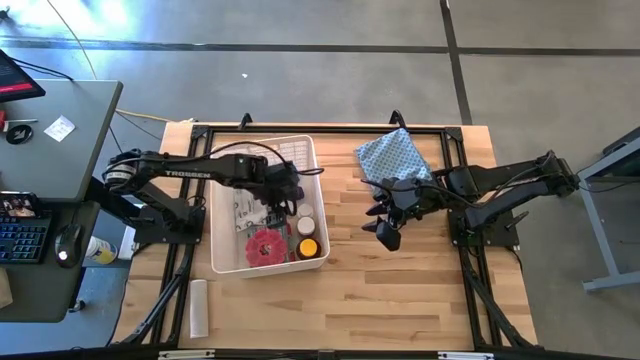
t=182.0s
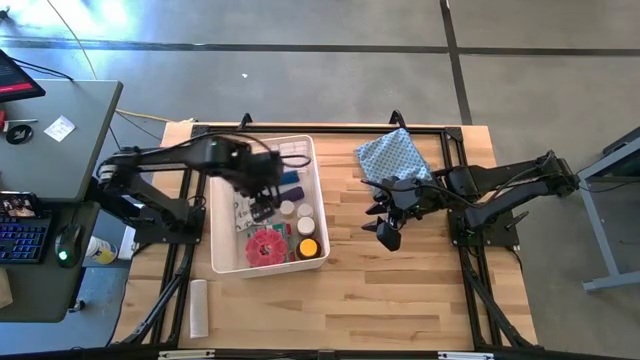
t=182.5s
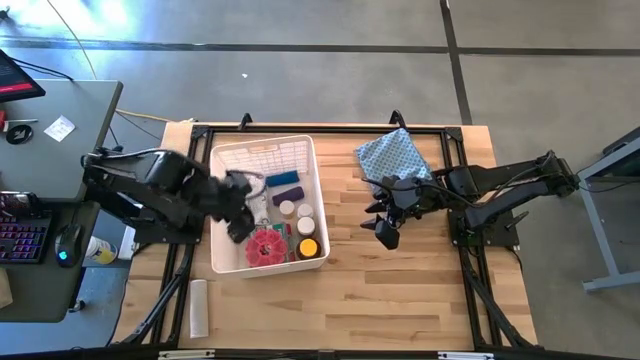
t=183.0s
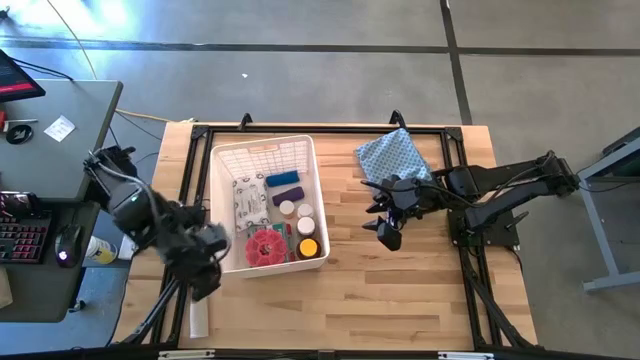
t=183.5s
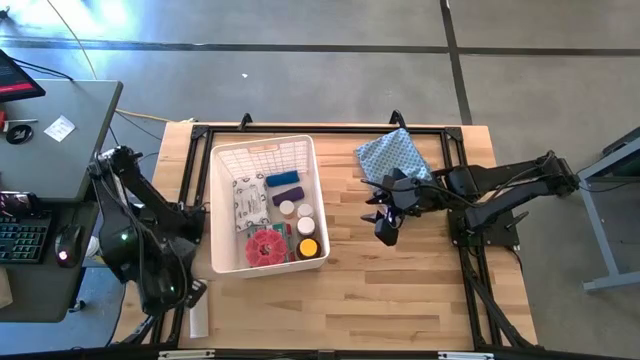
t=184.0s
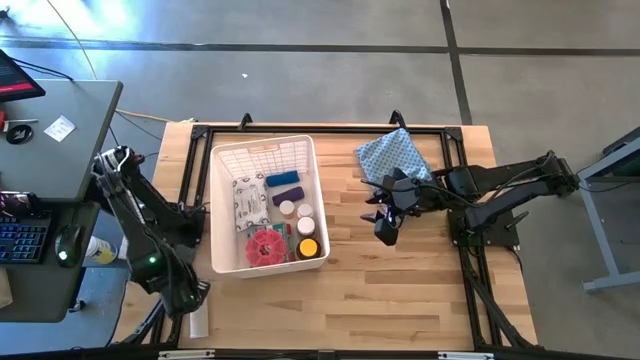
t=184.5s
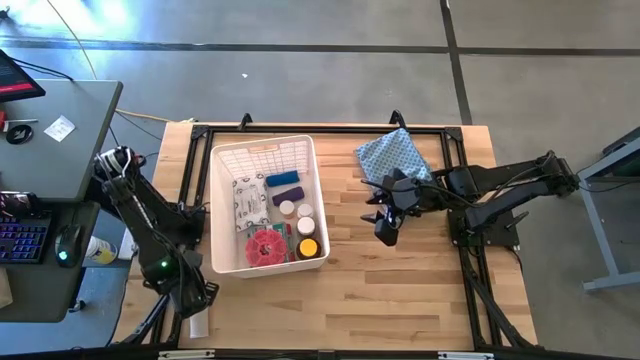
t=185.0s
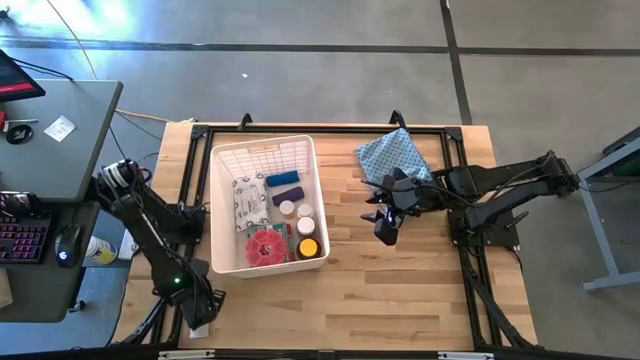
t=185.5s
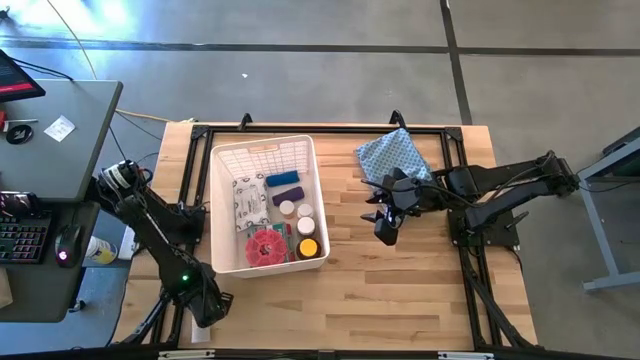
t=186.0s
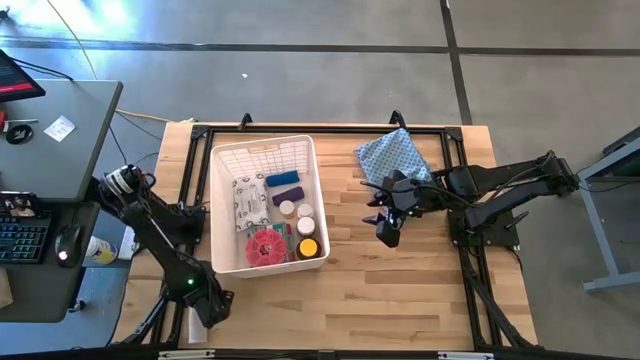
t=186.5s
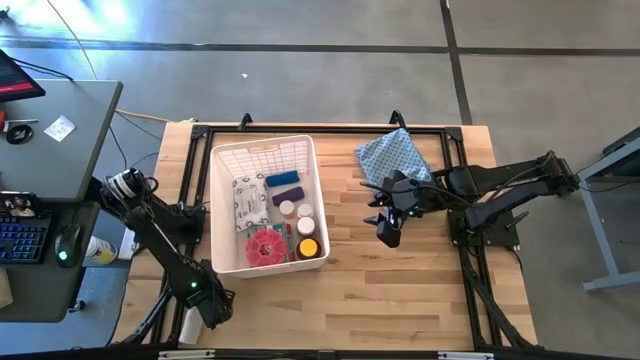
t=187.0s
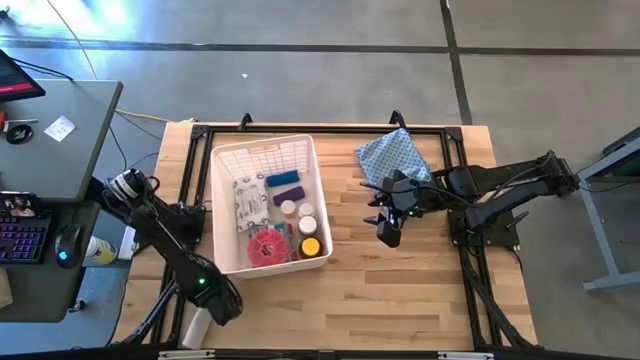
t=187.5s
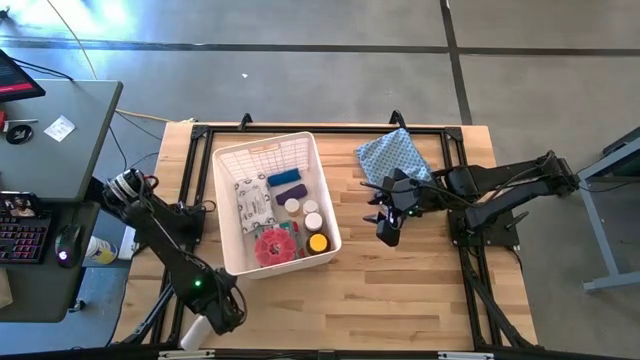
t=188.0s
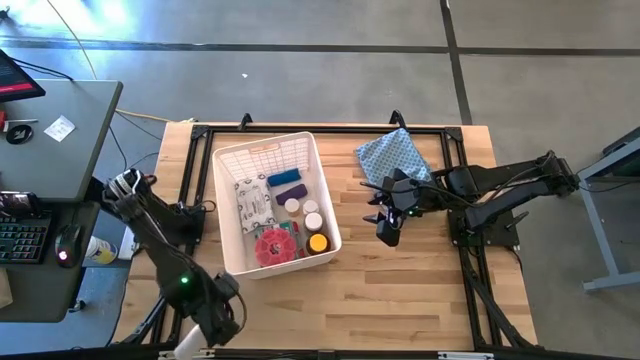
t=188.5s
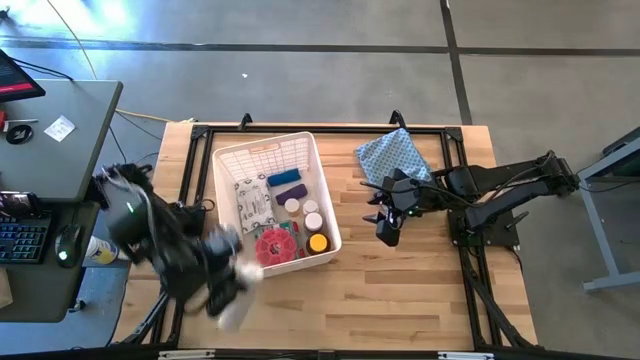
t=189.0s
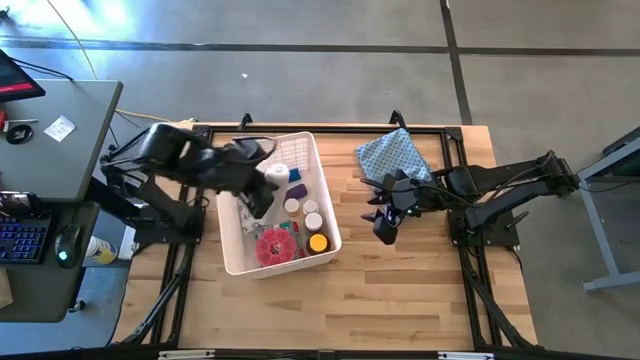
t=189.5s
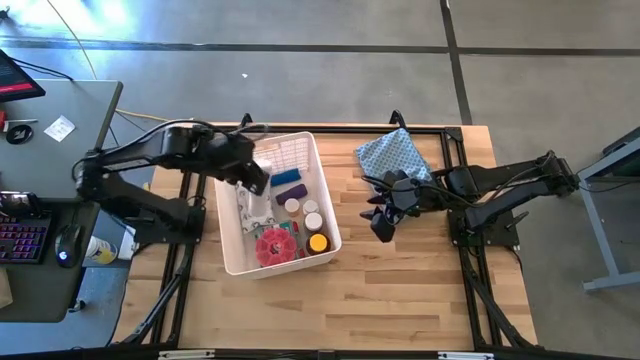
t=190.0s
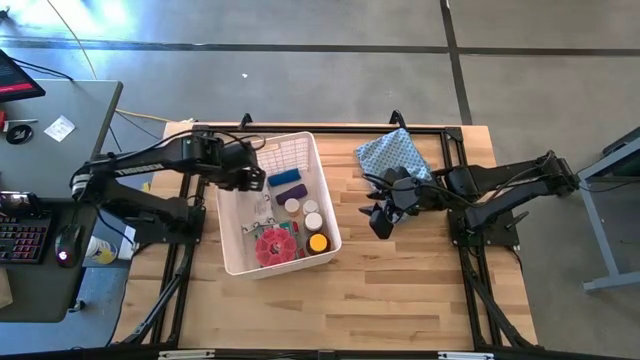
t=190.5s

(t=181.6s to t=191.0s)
Task: Pick & place medical supplies in basket/bin
Put the white rolled gauze into the white bin

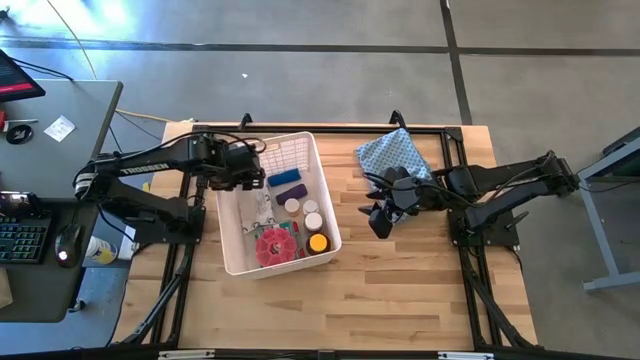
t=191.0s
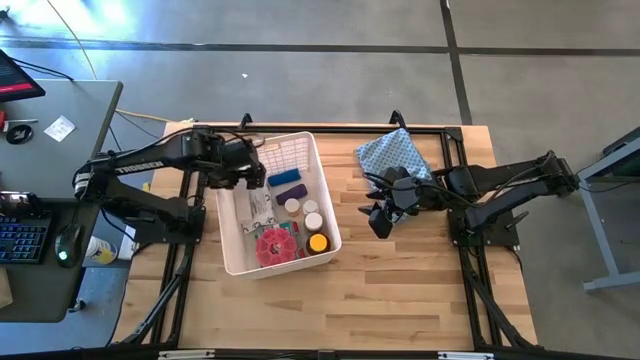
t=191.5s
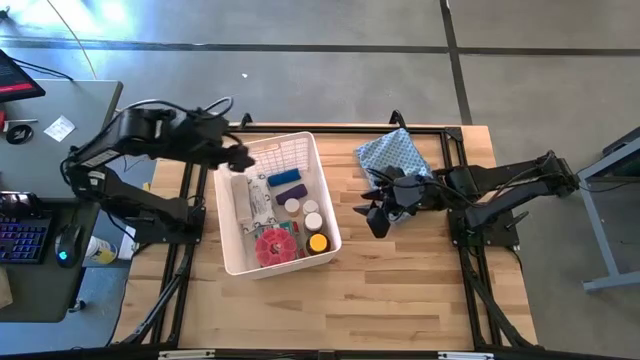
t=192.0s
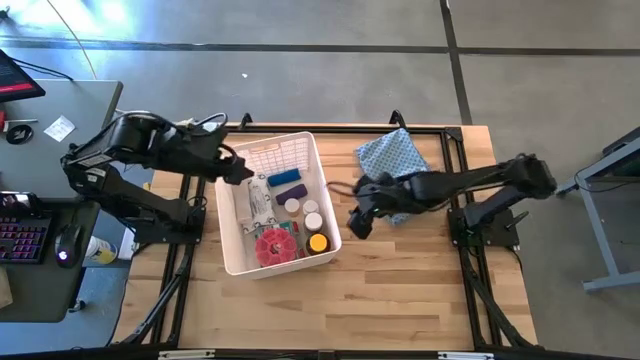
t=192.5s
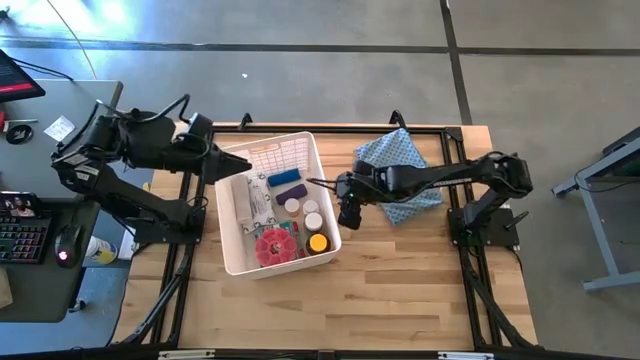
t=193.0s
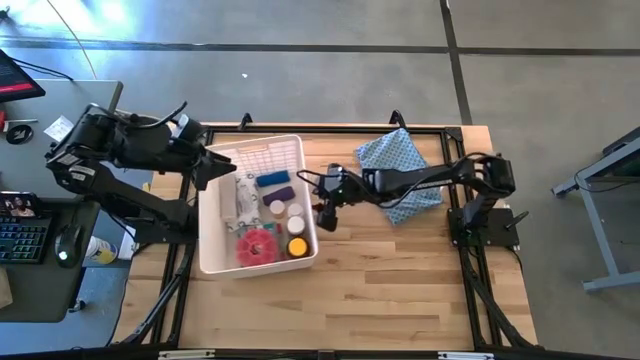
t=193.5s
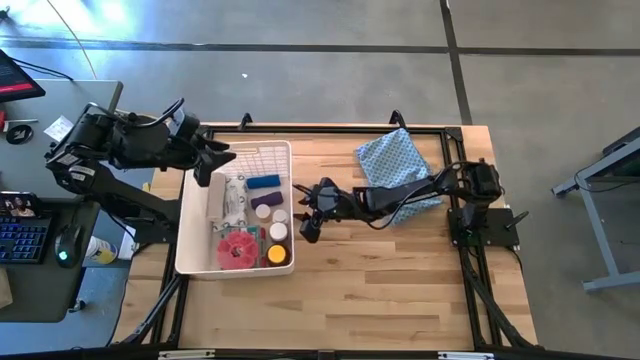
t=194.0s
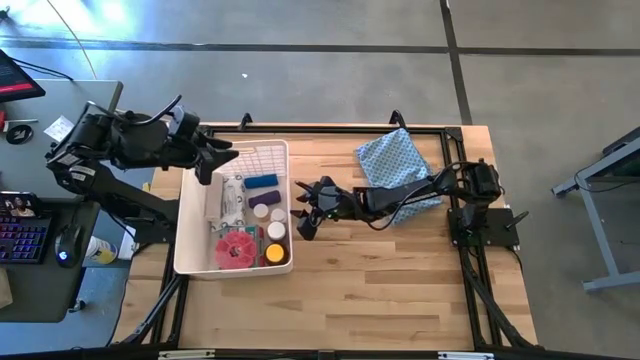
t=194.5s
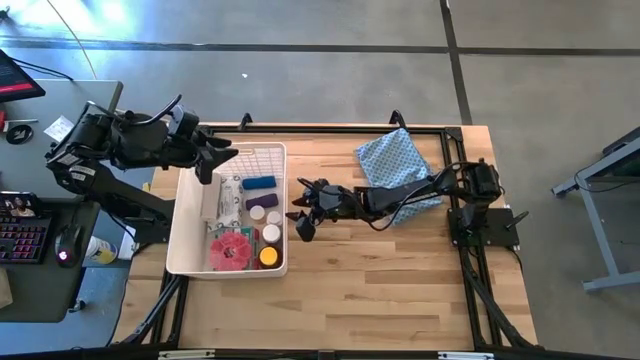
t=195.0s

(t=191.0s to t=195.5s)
Adjust the white bin

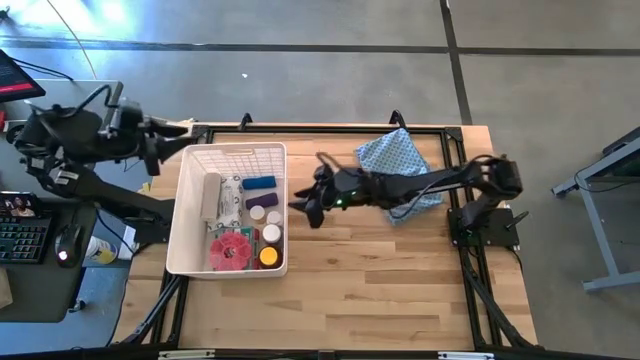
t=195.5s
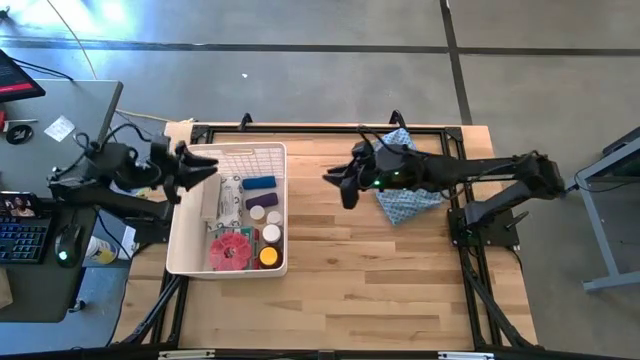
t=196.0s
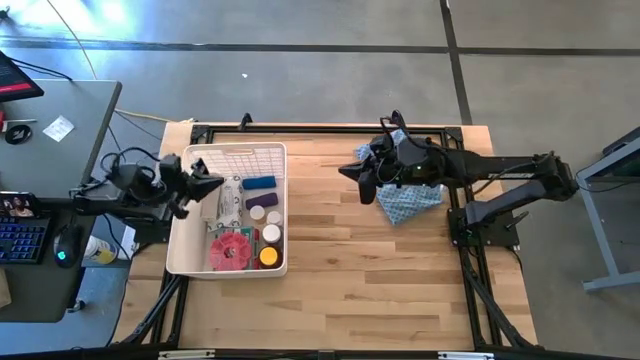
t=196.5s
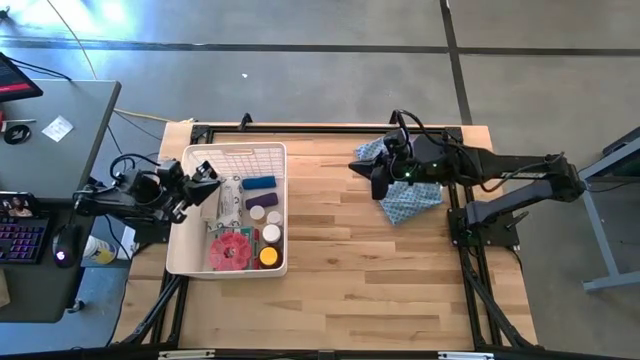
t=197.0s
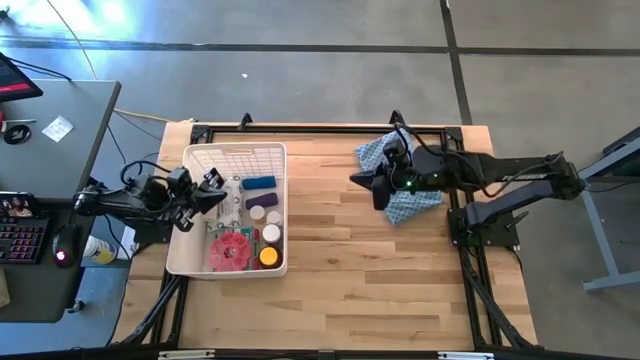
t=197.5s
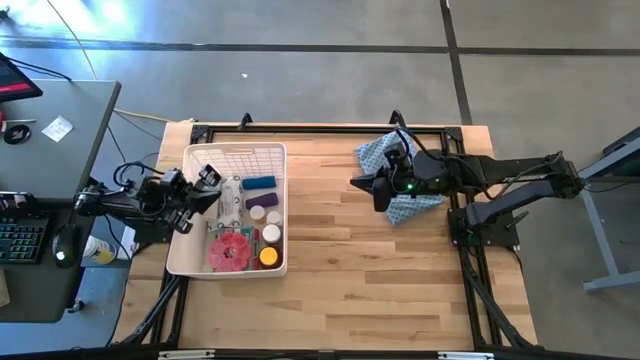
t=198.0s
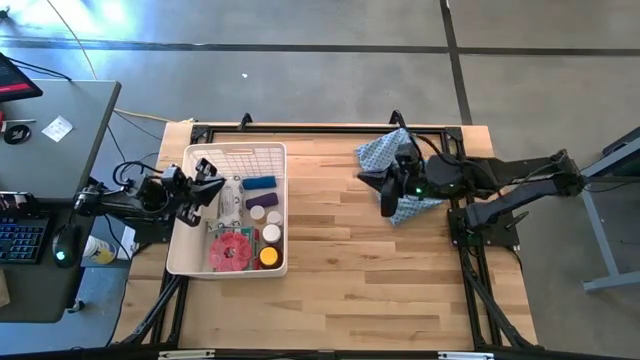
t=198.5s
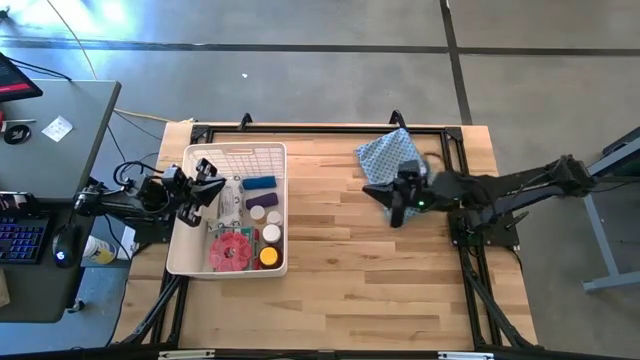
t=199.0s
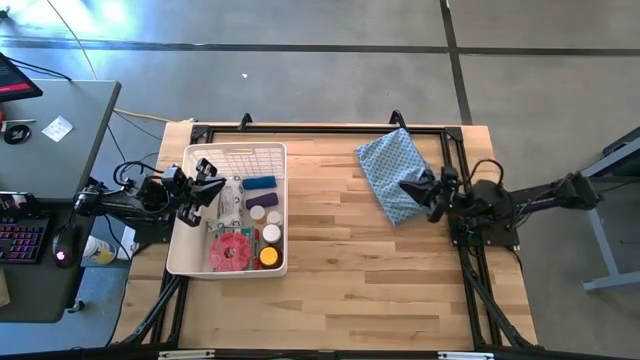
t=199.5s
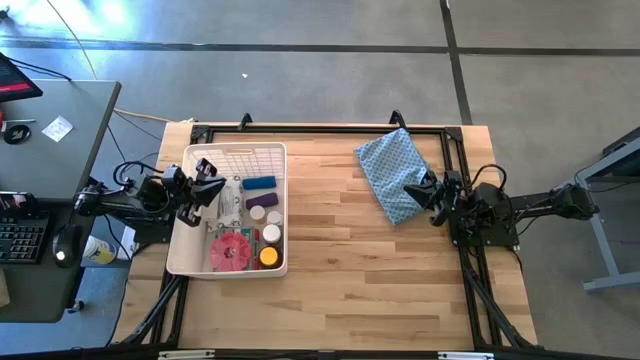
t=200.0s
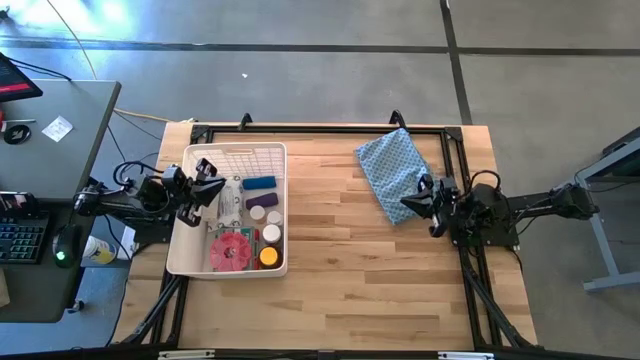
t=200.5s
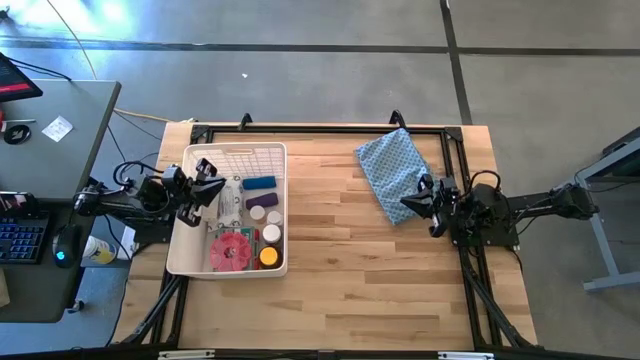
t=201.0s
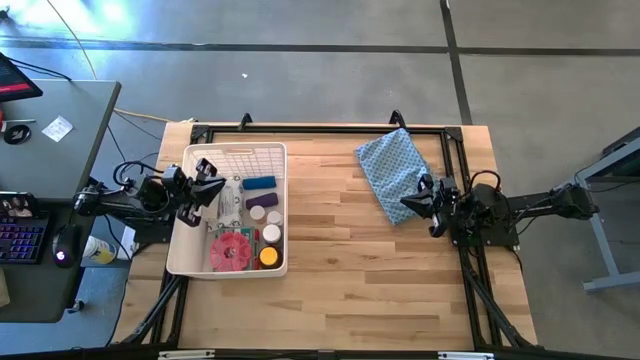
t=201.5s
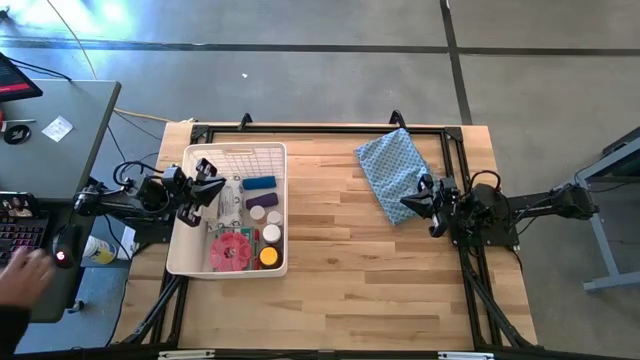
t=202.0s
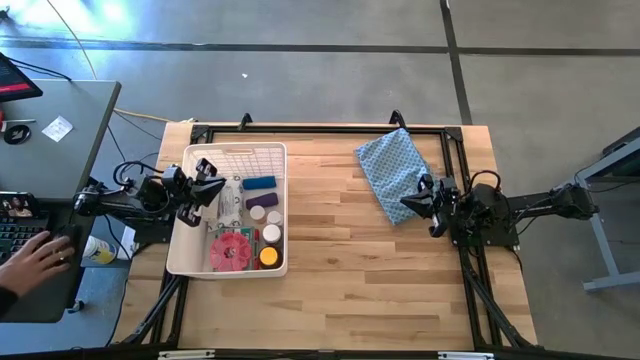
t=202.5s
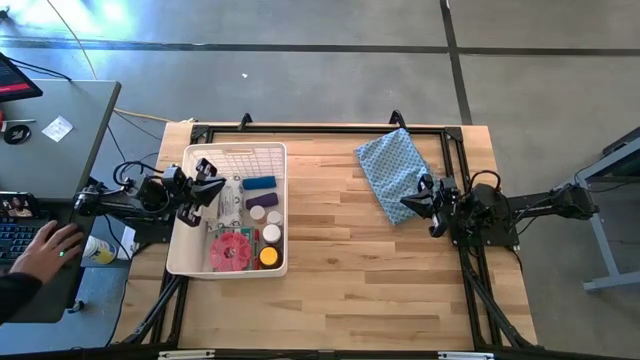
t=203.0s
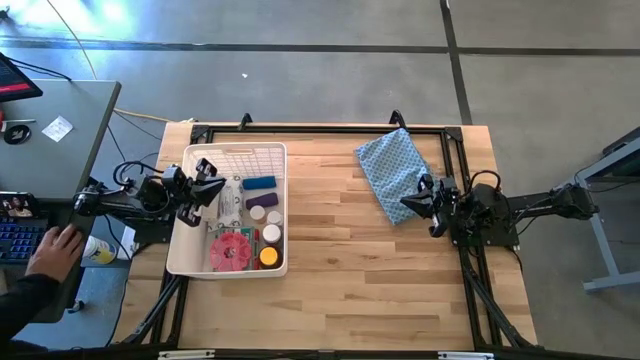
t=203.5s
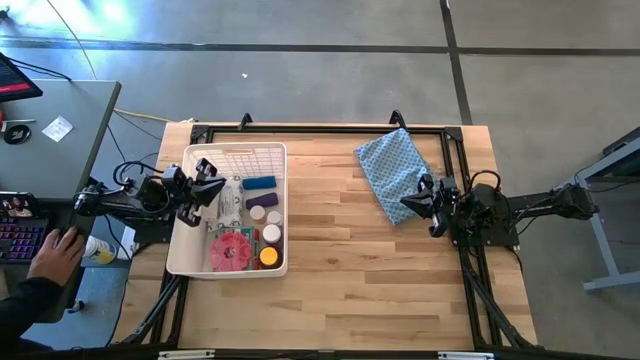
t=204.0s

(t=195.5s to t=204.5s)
Return to Home Position
